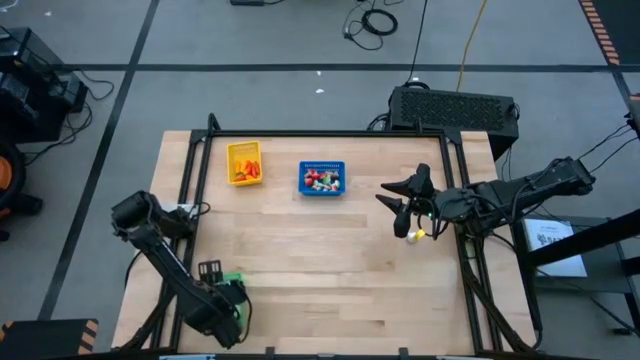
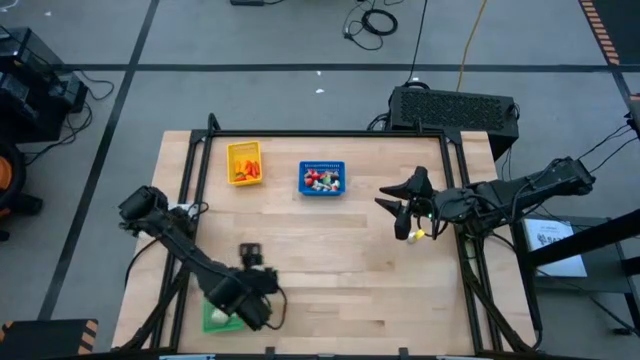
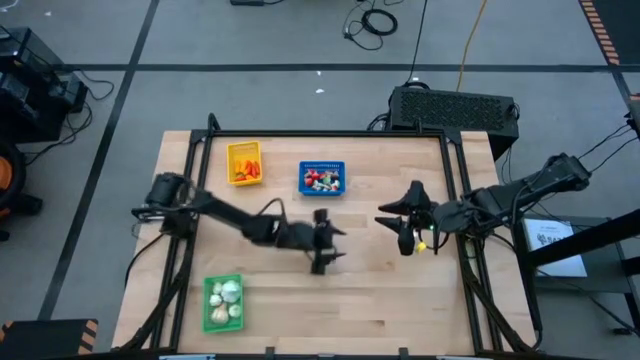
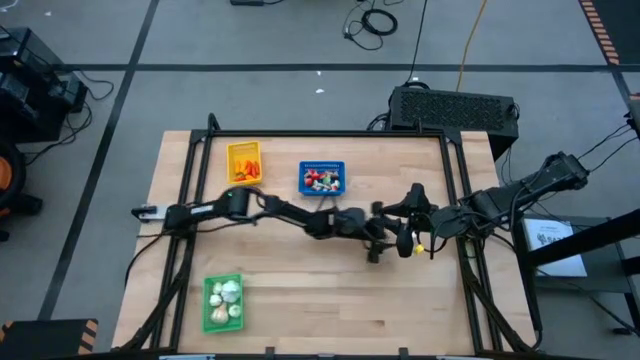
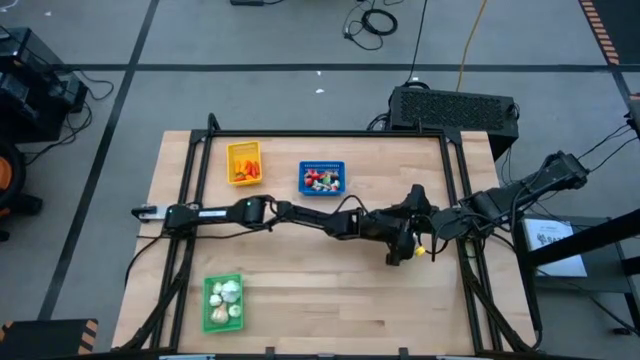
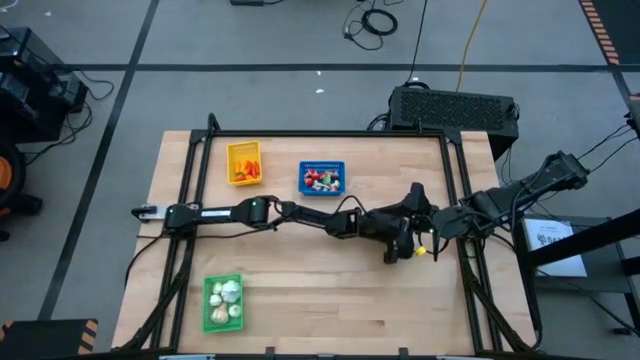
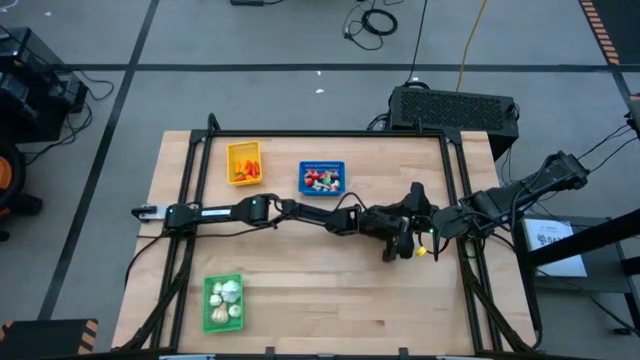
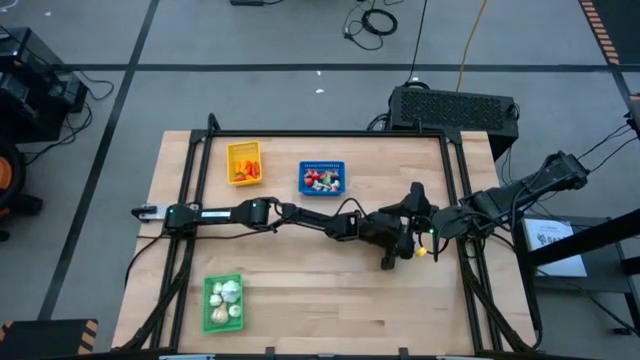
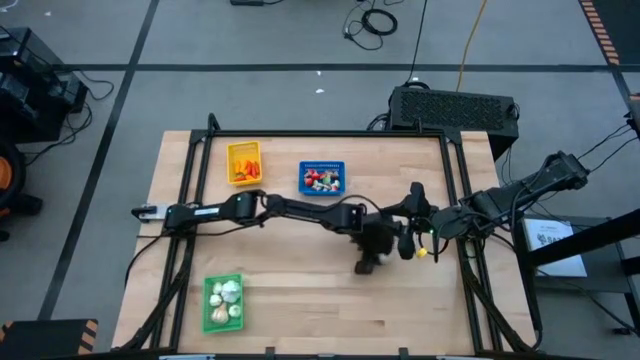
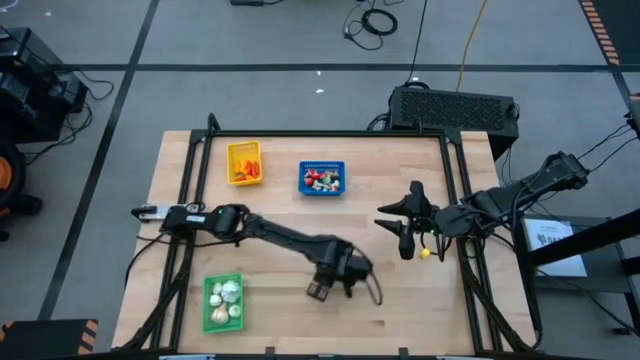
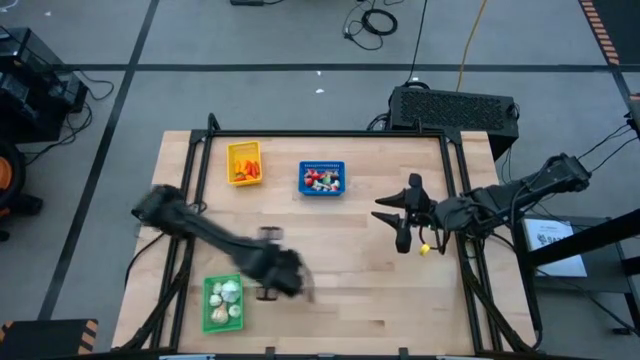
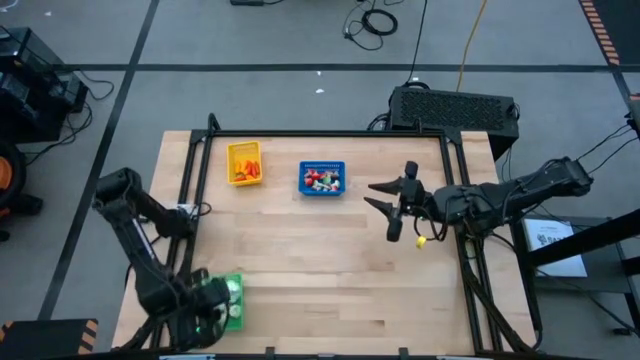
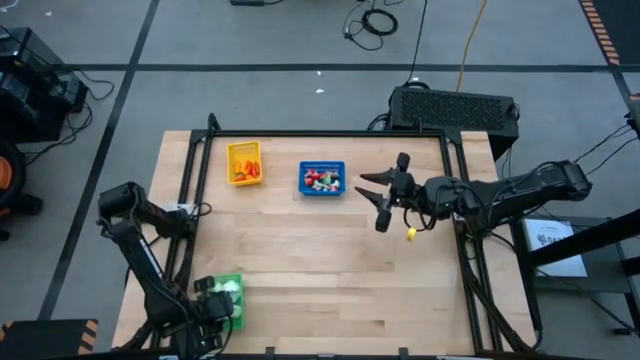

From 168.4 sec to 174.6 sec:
Task: Sort produce into baskets
Put the garlic into the green bin

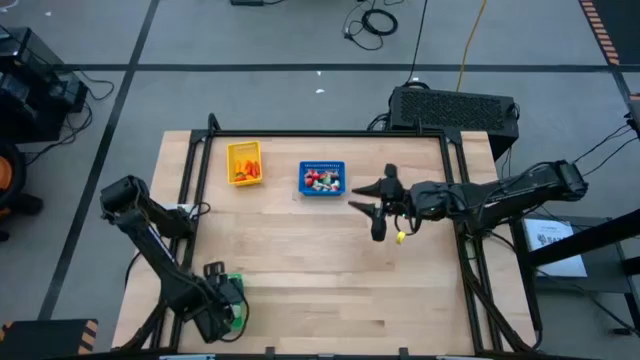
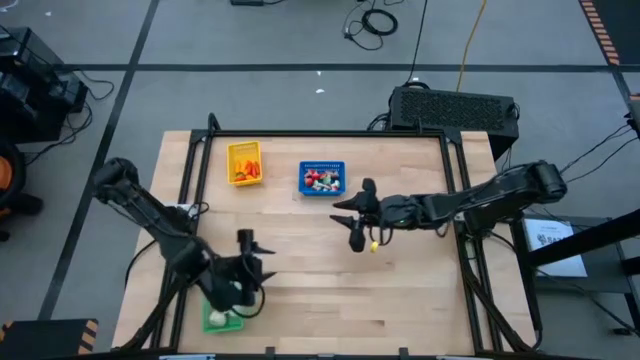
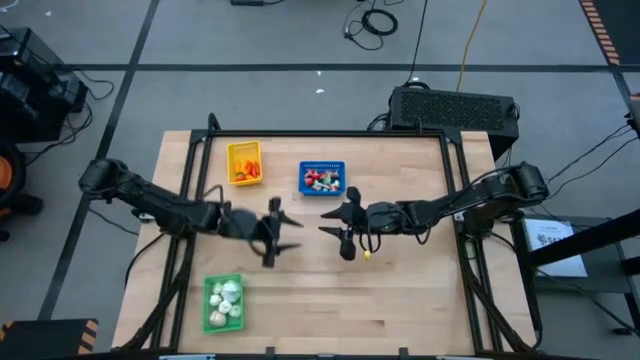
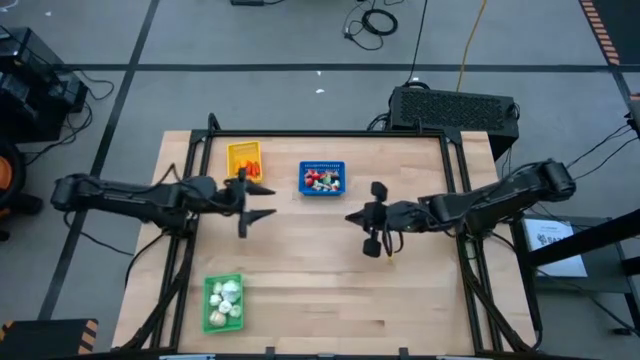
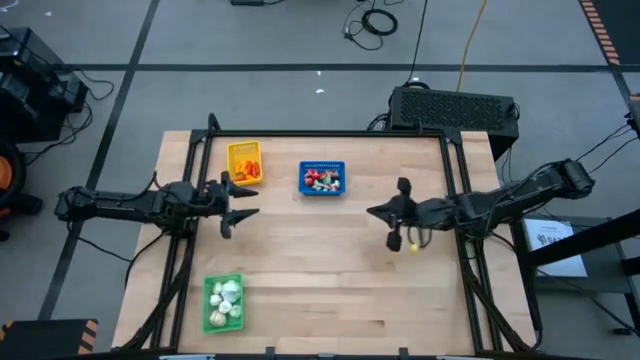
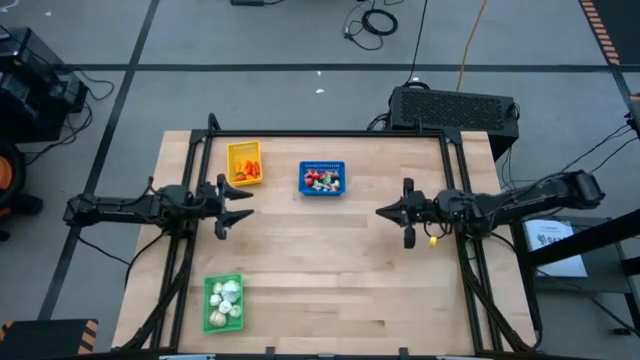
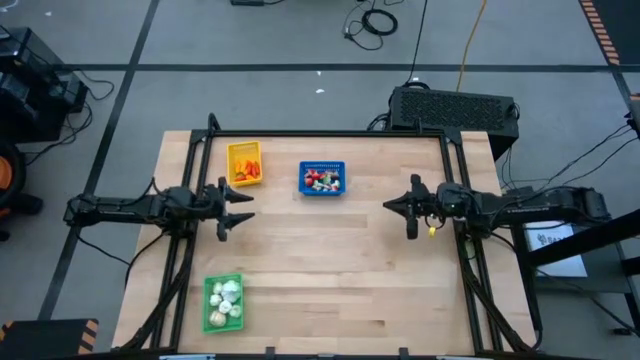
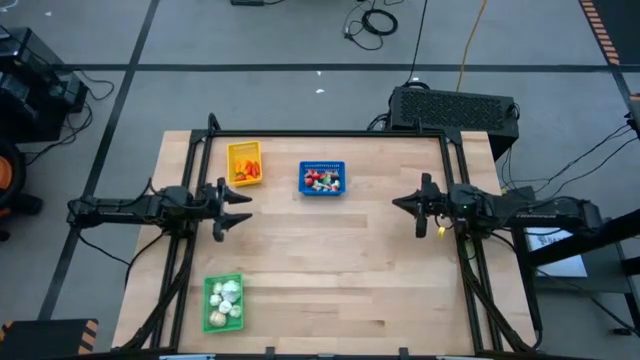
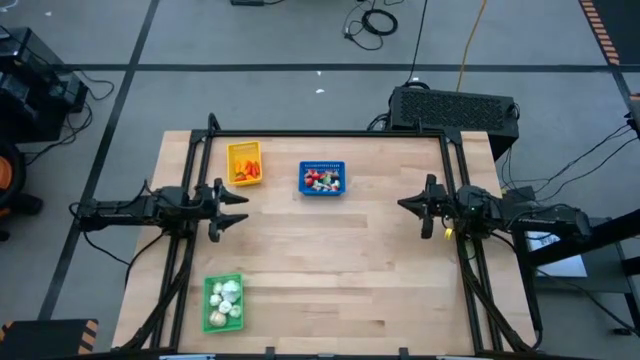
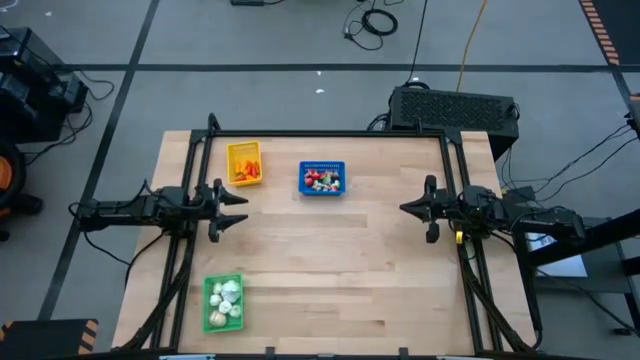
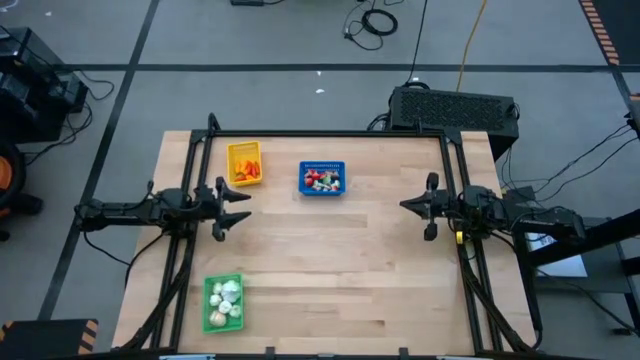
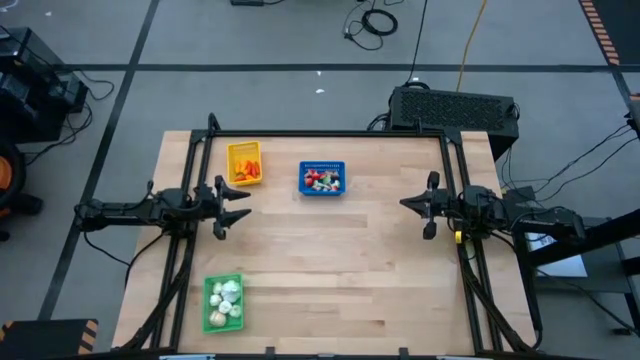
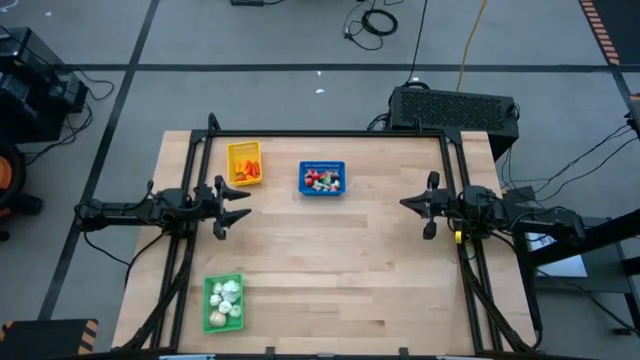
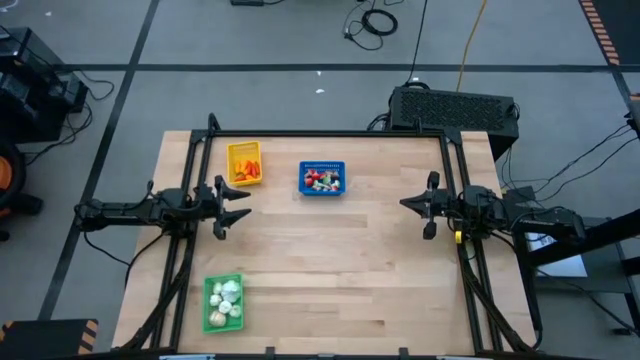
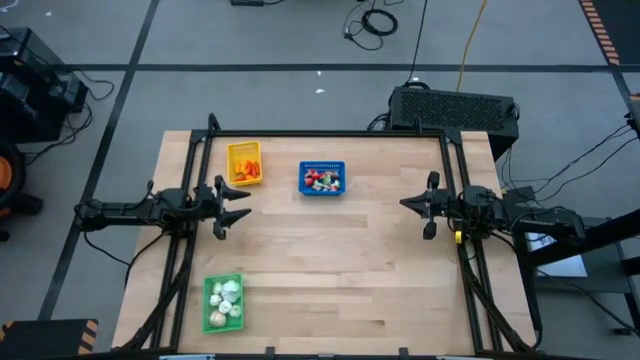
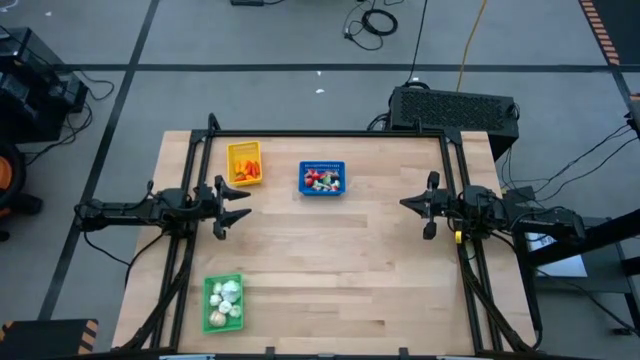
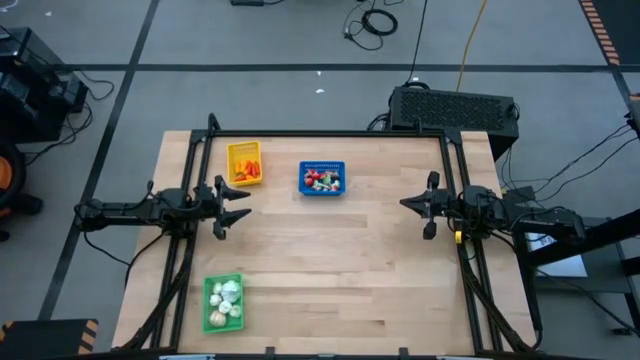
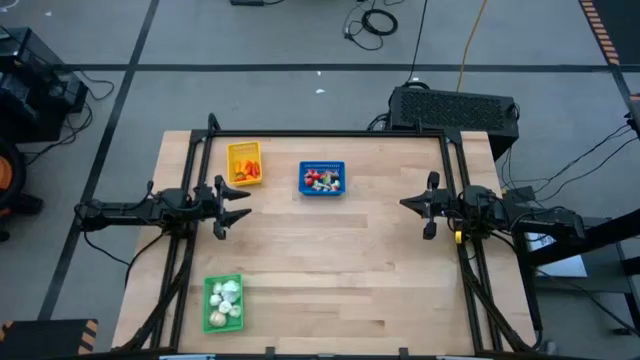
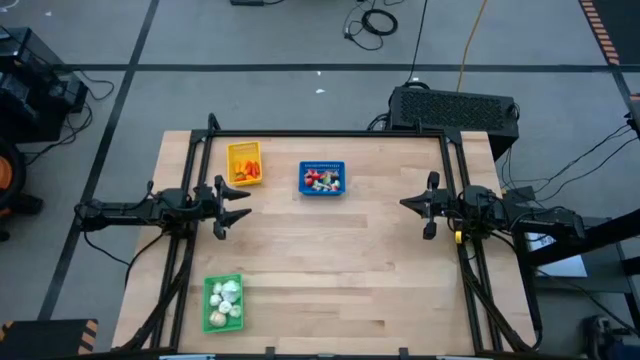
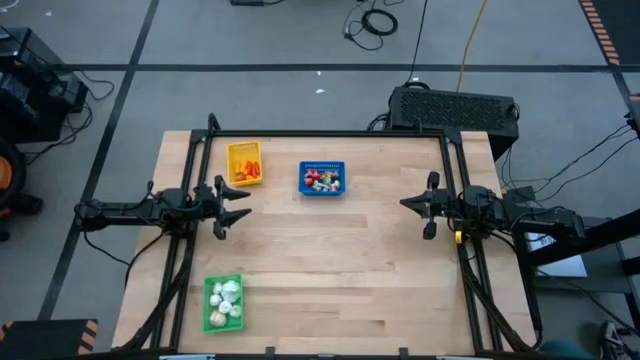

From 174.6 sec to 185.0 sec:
Return to Home Position

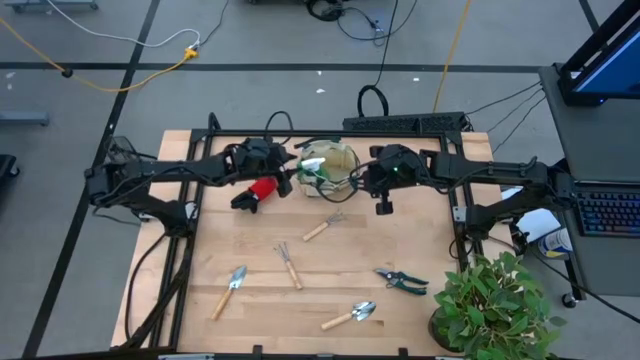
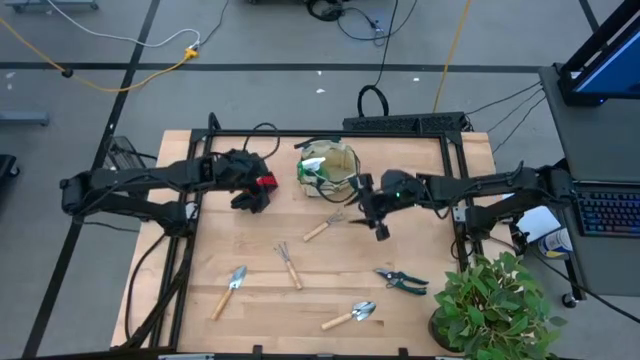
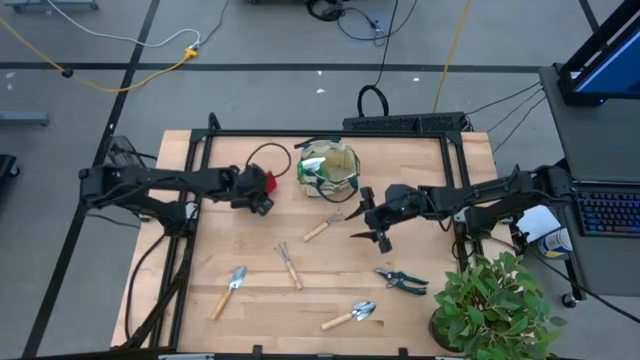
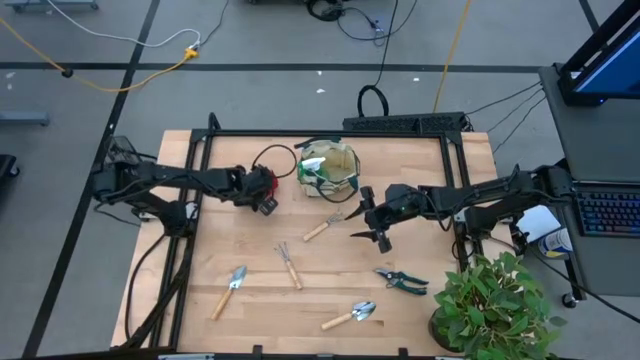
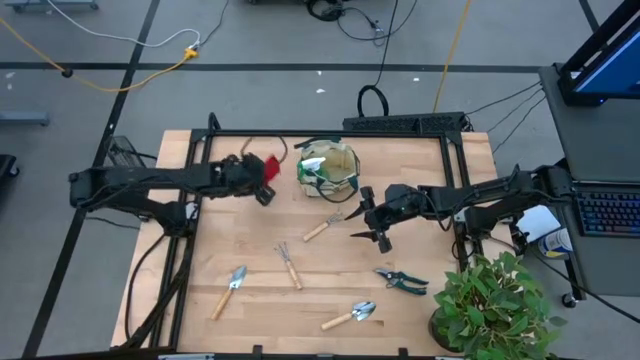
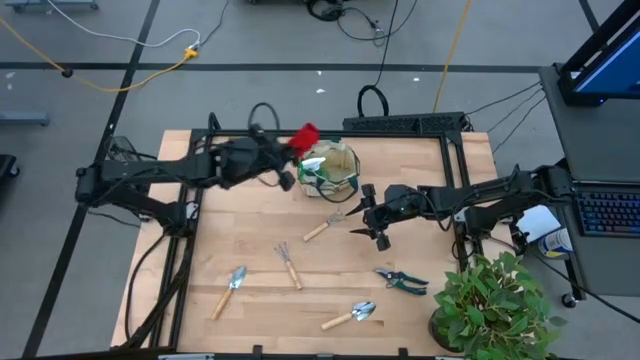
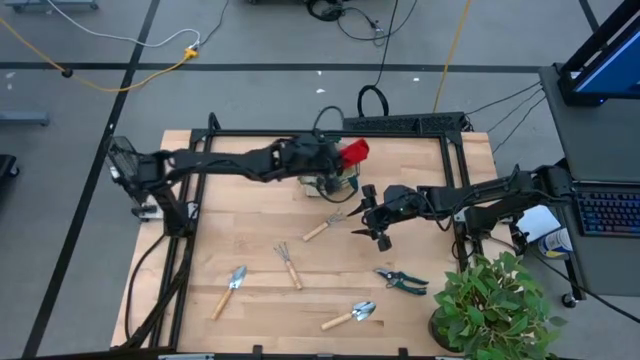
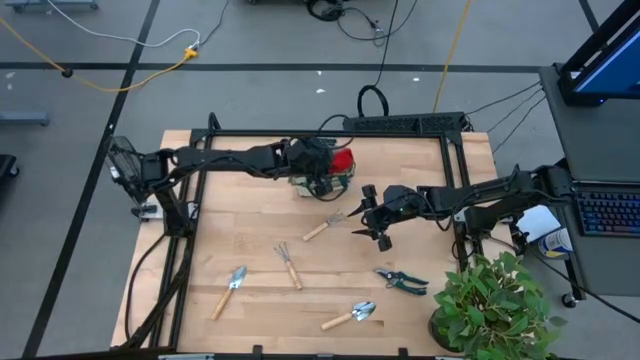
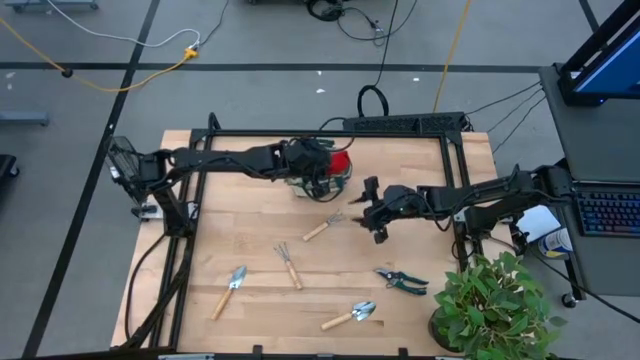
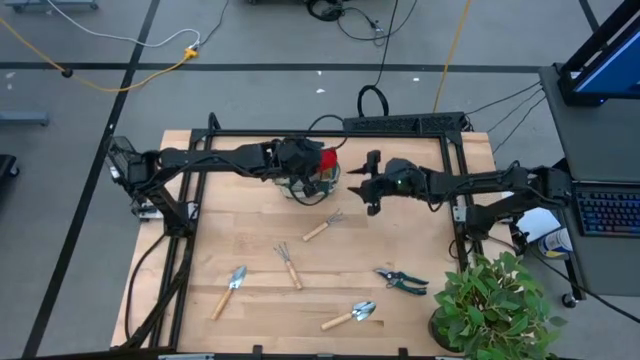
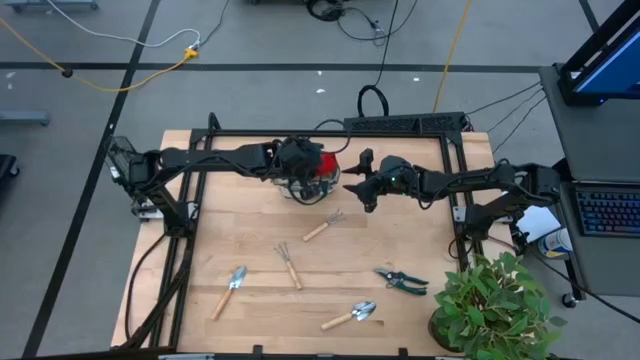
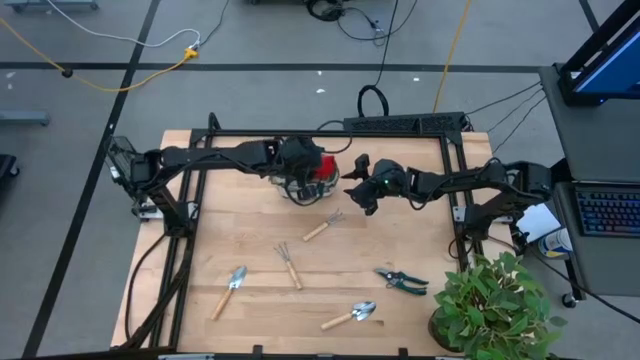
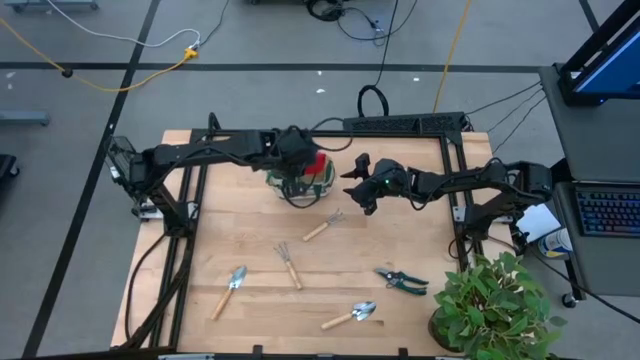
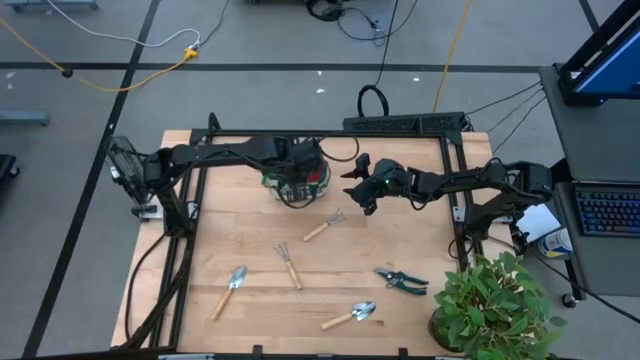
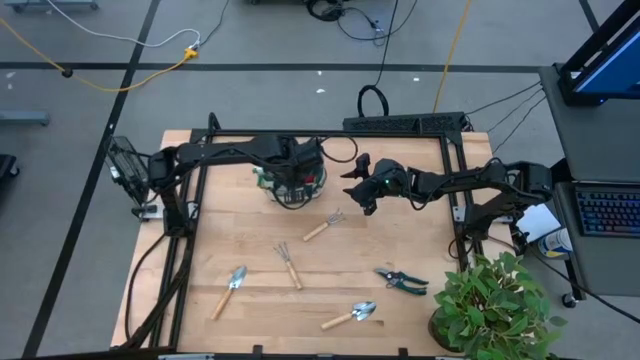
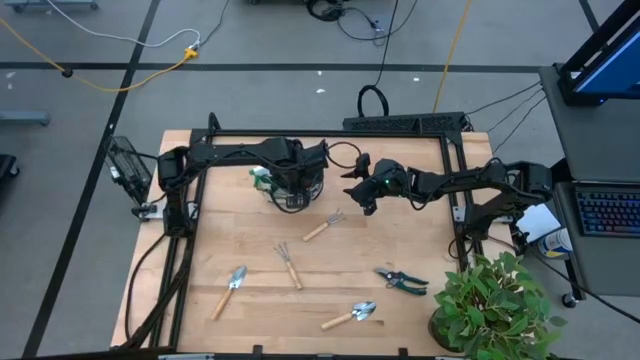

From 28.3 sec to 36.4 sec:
Task: Pick & Place Garden tools in Gardening bag
Put the black gloves into the gardening bag
